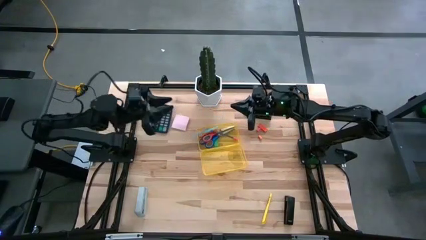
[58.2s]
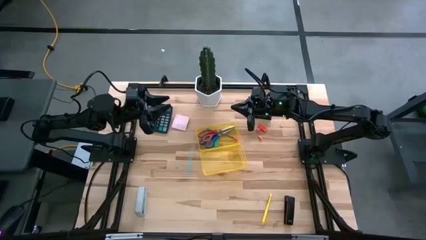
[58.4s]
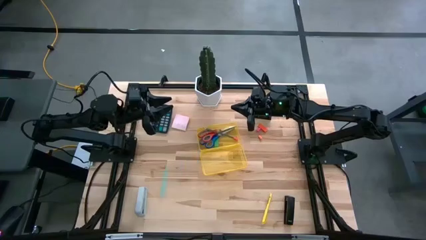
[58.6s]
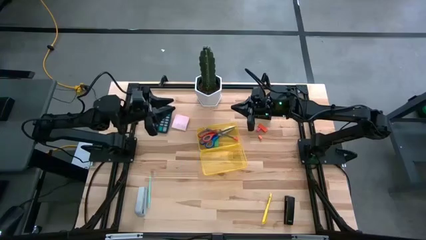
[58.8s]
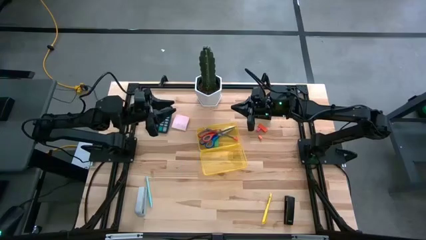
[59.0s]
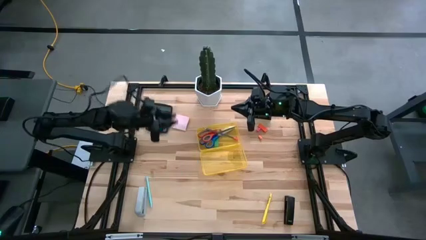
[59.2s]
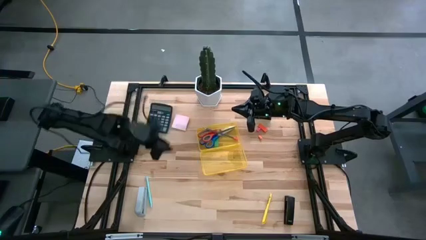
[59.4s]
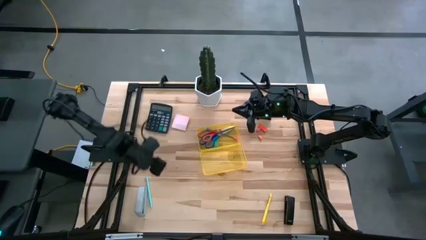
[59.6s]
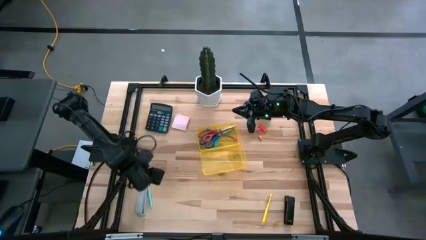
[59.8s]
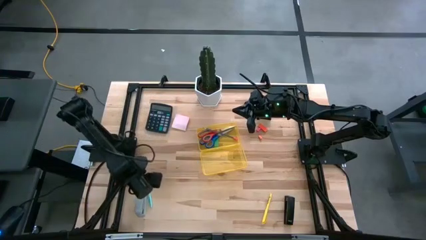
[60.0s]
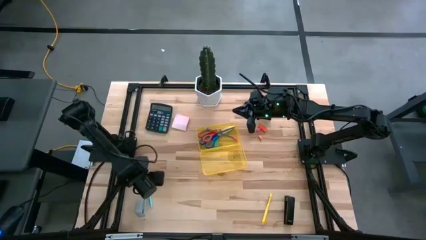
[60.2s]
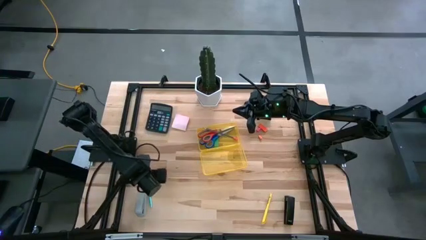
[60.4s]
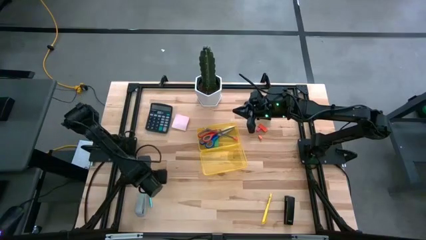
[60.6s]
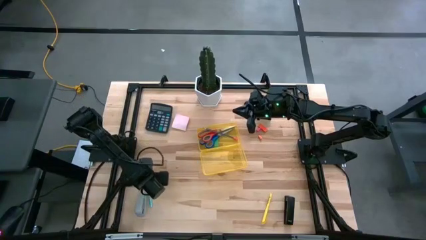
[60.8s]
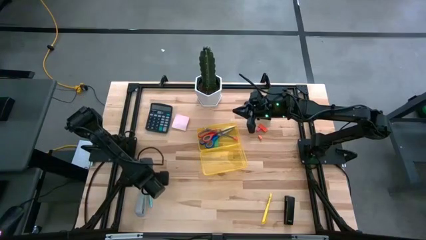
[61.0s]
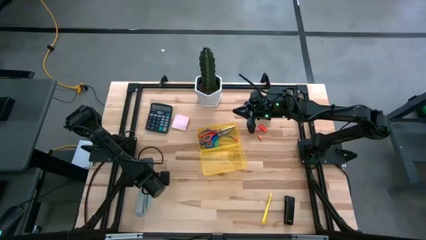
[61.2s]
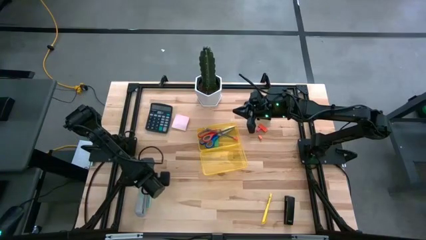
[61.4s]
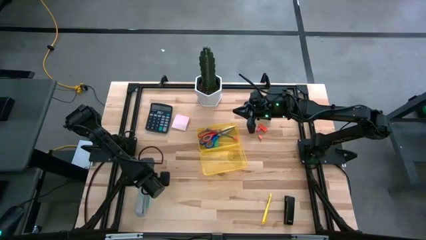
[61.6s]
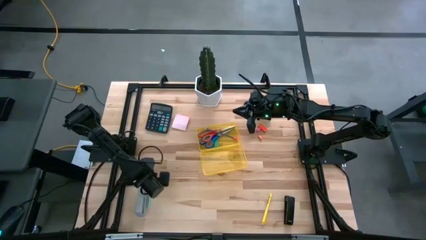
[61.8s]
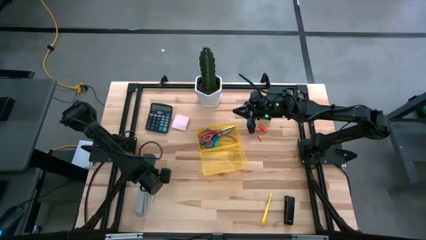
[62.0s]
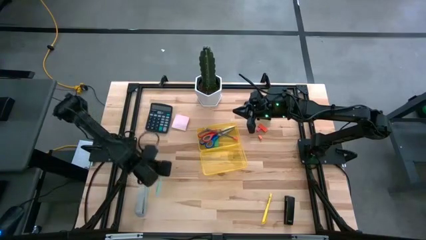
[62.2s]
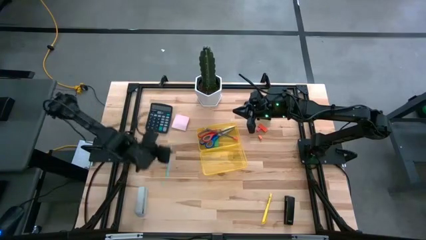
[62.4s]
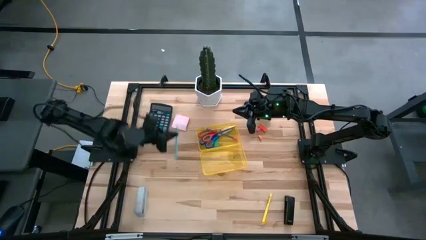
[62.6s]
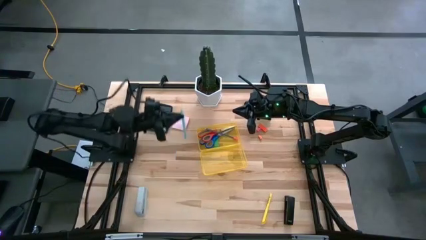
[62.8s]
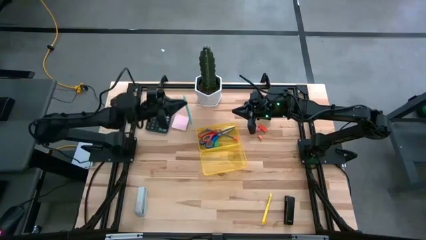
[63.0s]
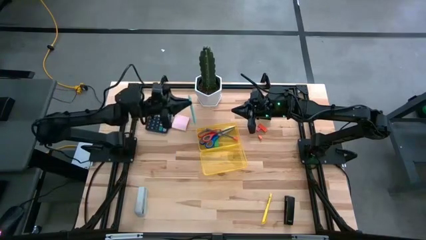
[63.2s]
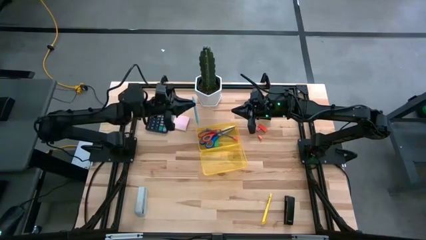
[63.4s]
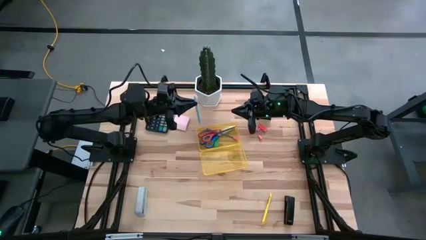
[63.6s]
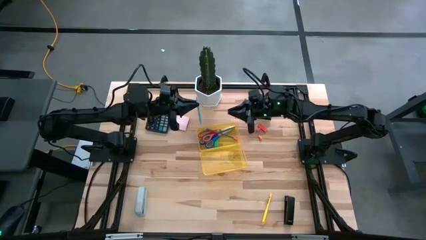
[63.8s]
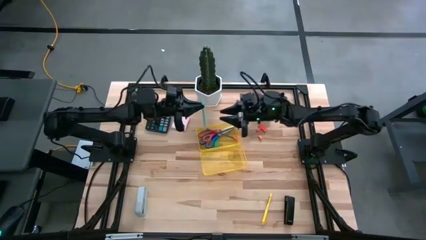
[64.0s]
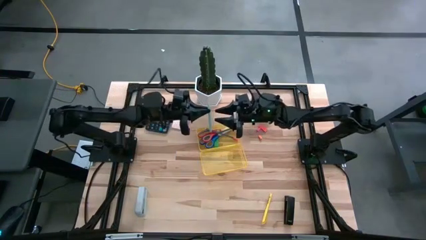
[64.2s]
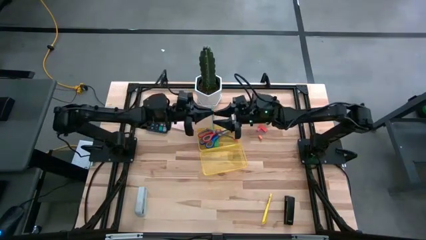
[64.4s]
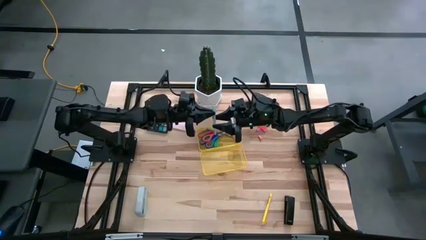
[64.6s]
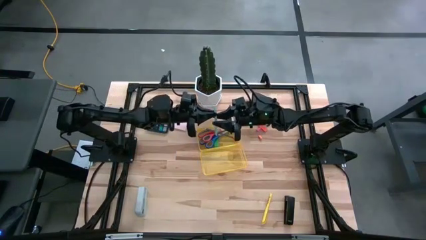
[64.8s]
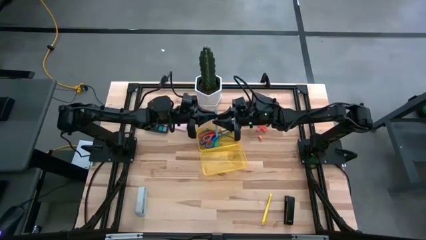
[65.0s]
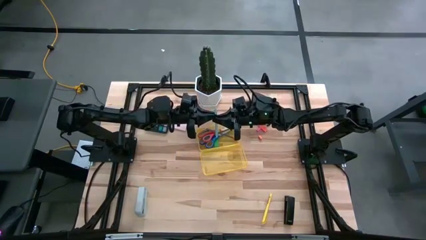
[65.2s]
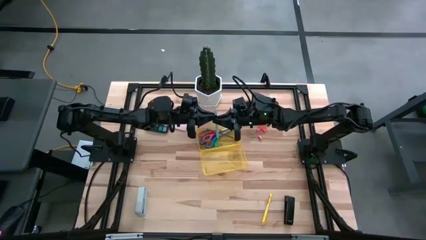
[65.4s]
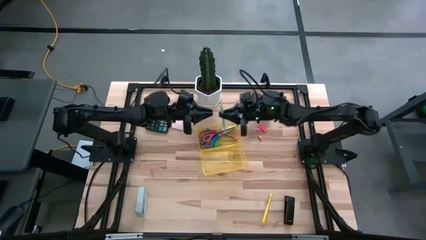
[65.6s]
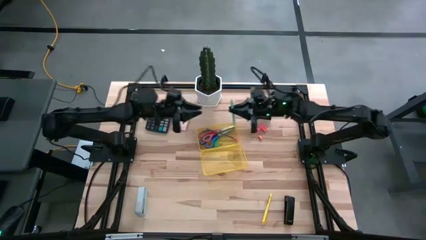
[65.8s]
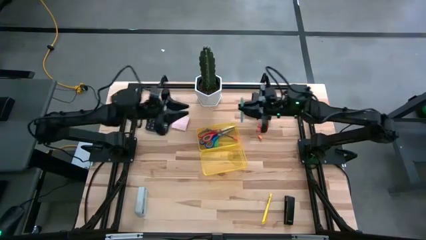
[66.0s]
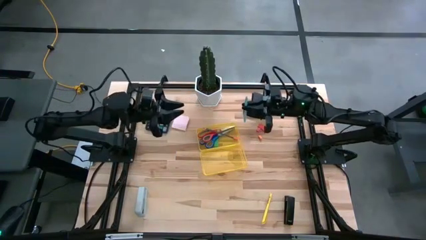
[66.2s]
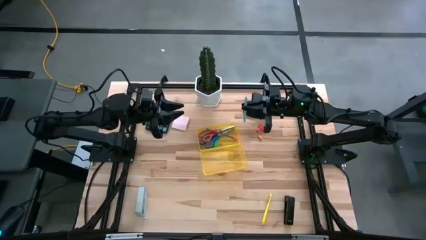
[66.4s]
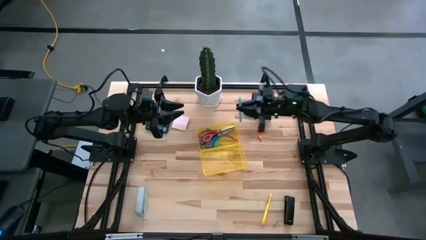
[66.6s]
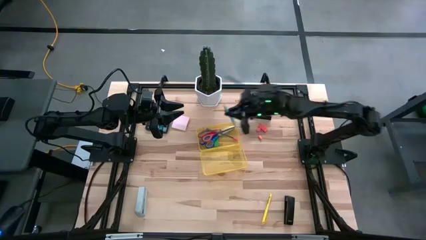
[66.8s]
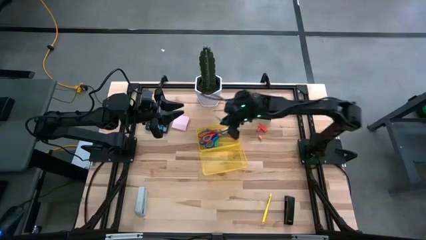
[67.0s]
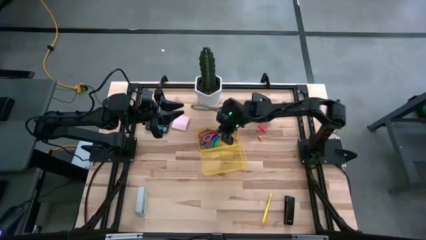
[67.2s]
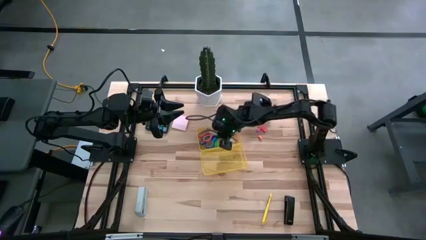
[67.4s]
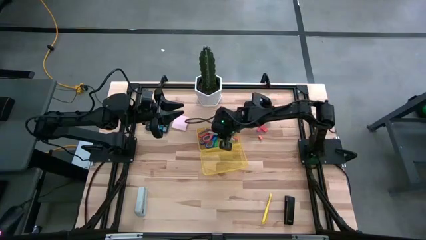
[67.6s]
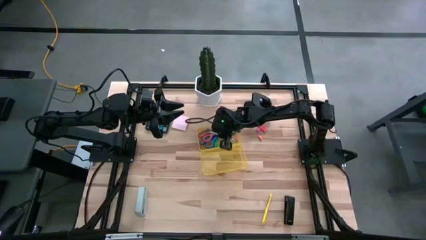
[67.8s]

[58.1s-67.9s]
Task: Pack school essentials
Put the blue pen into the yellow supply box

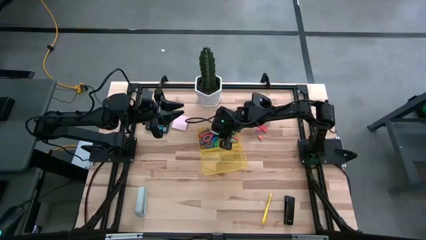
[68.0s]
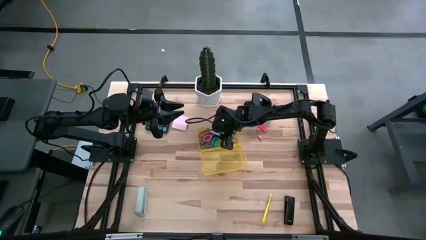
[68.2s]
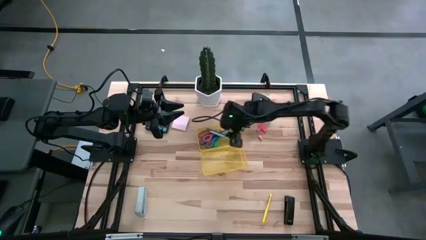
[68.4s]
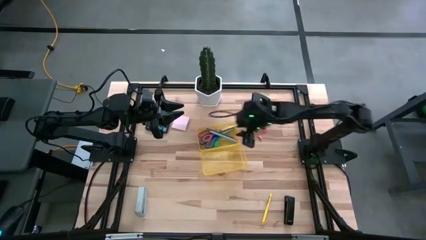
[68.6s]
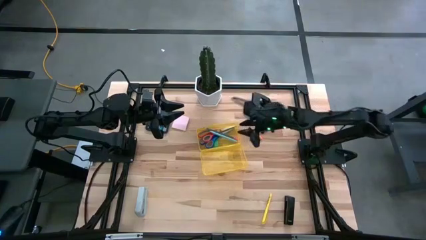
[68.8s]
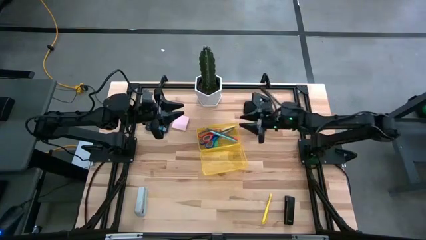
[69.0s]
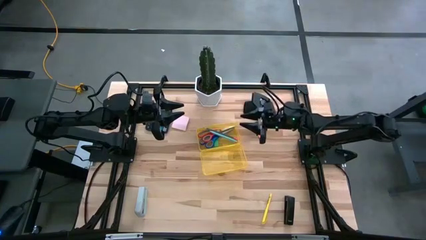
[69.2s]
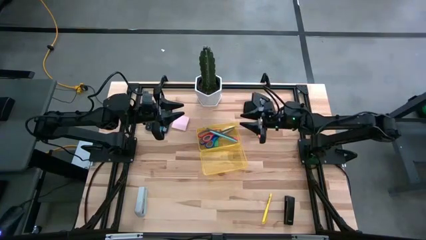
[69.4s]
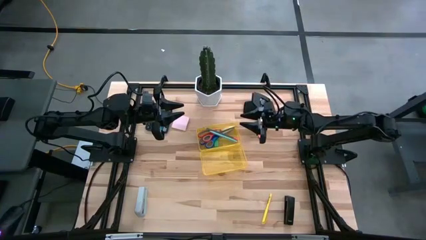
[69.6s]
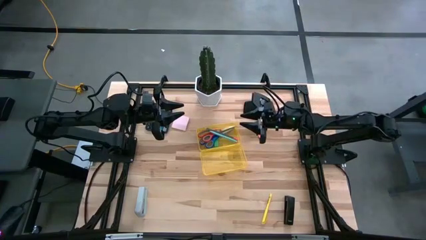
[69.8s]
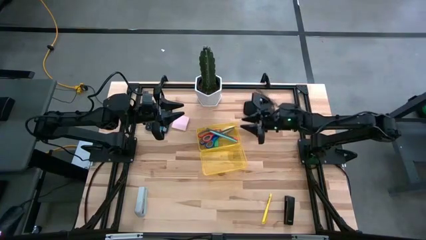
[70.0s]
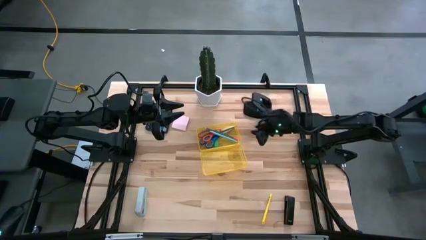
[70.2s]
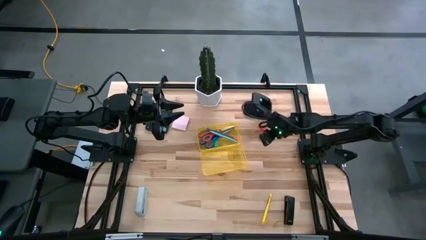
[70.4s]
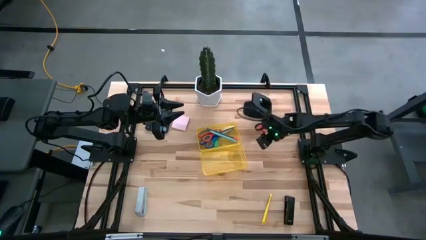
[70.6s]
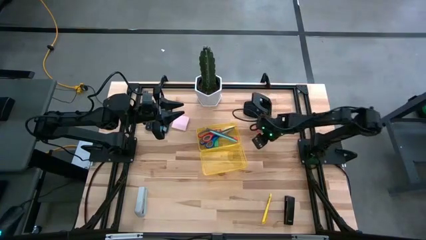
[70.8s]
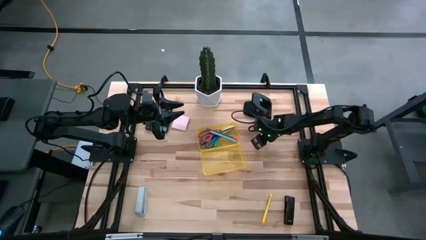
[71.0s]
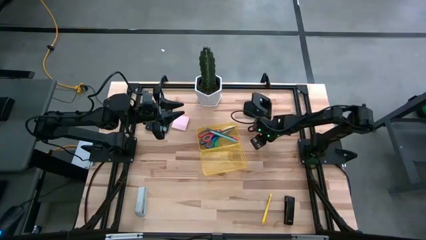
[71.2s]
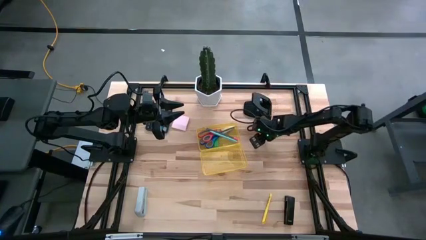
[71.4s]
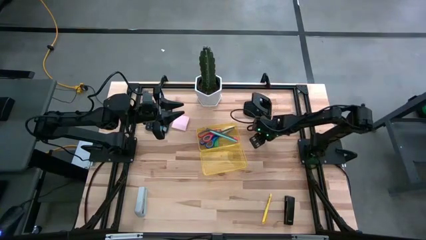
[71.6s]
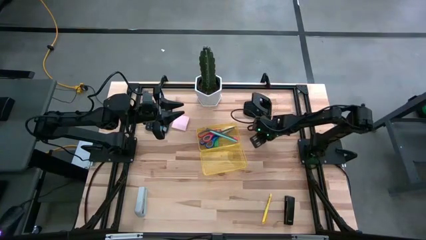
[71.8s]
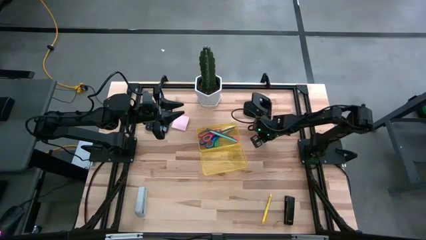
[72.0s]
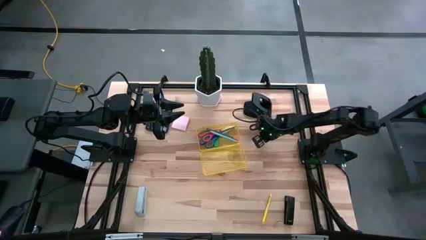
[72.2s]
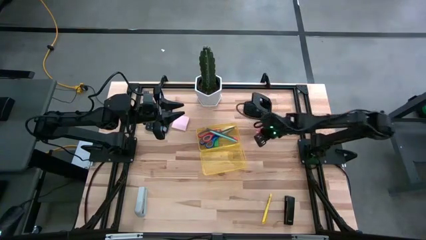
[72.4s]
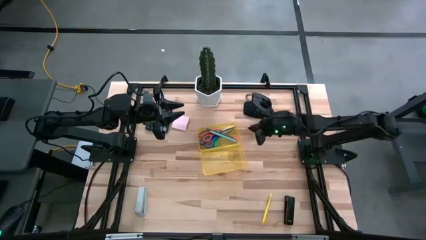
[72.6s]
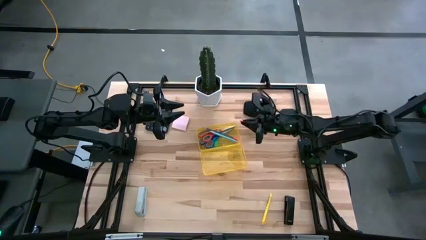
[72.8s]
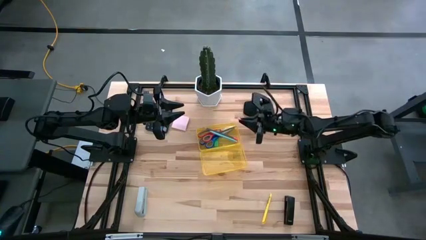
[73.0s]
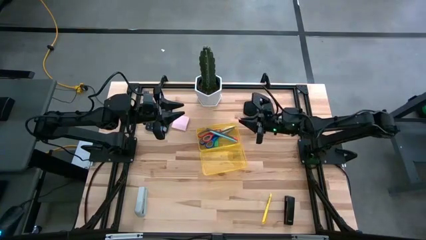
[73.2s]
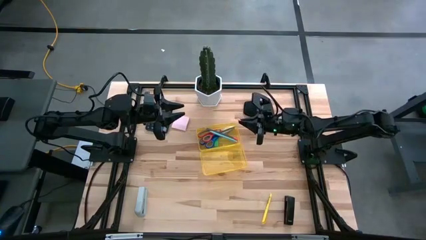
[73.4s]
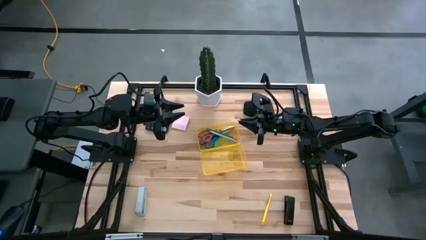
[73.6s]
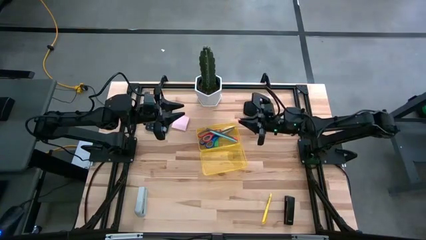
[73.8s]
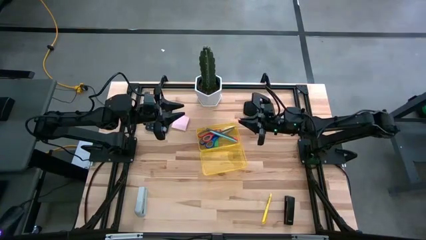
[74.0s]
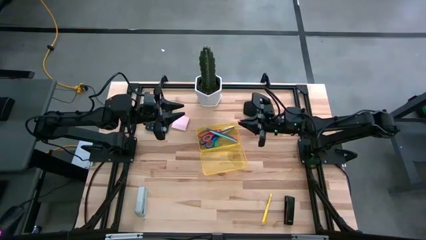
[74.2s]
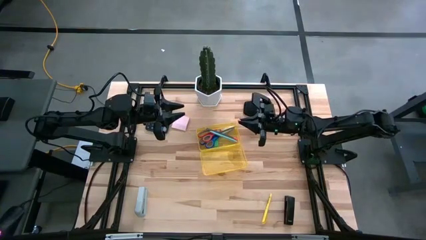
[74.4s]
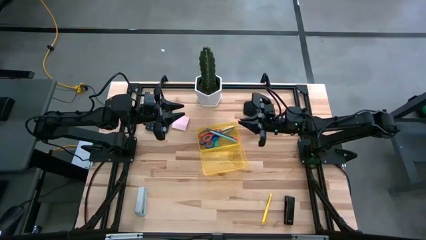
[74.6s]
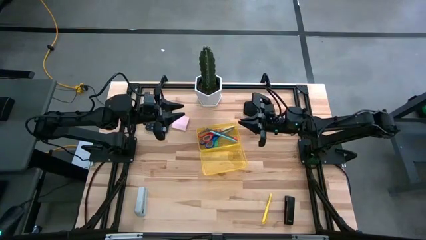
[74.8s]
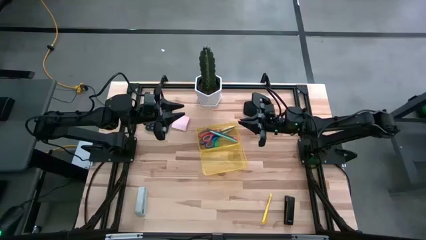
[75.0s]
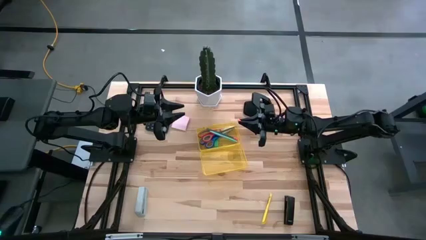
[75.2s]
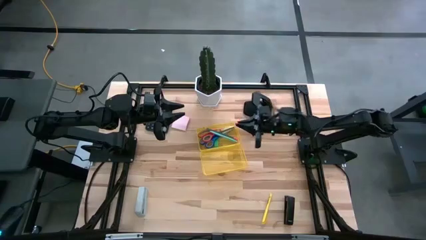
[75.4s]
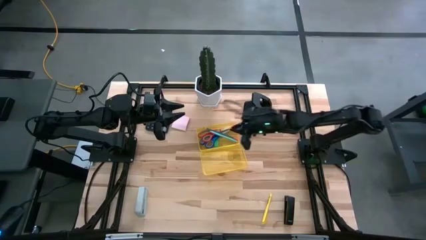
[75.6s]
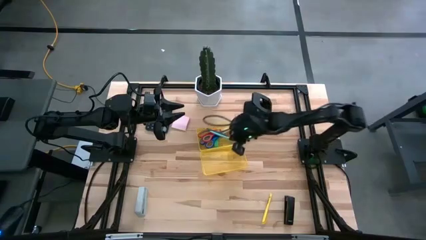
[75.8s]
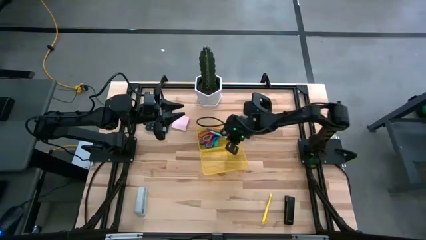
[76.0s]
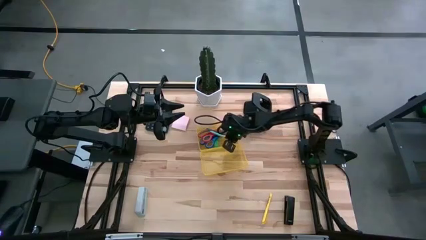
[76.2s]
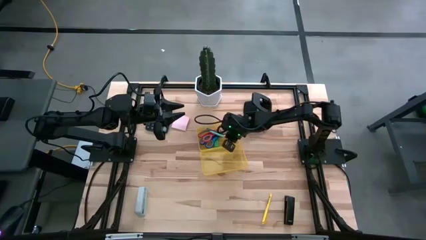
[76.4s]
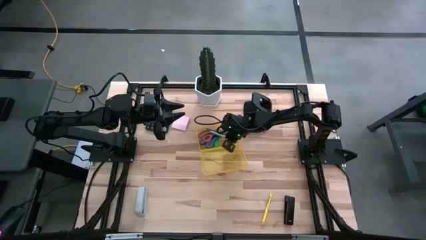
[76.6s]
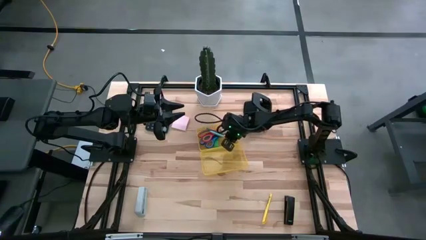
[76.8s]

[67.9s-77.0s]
Put the small orange eraser into the yellow supply box
